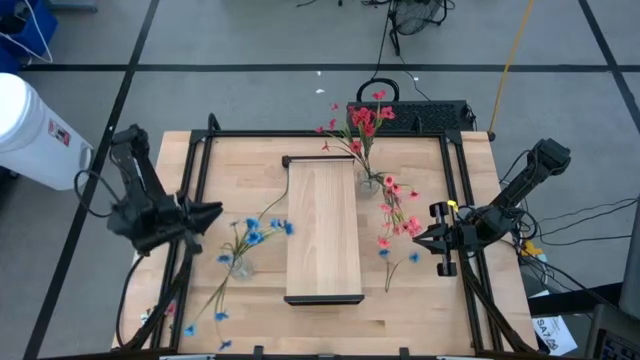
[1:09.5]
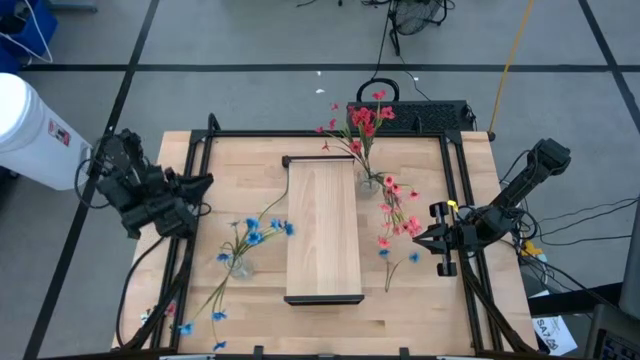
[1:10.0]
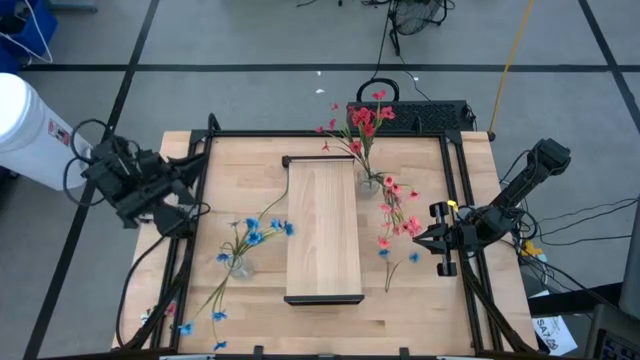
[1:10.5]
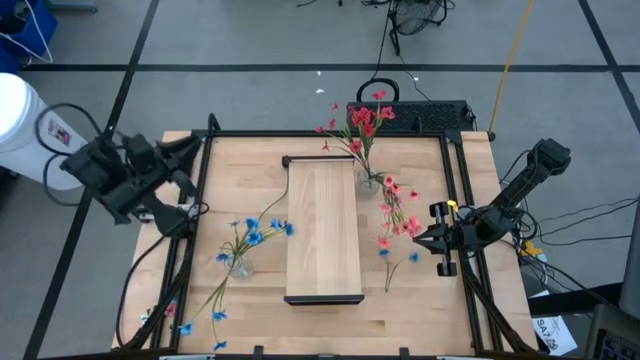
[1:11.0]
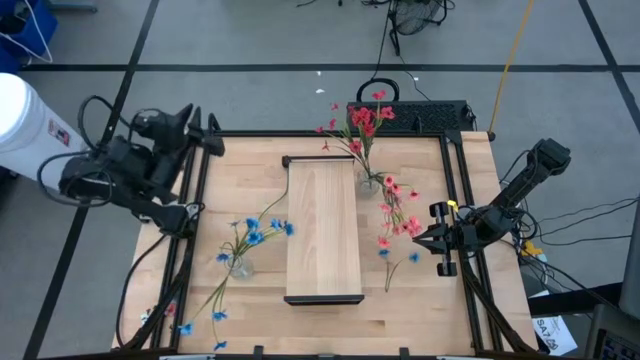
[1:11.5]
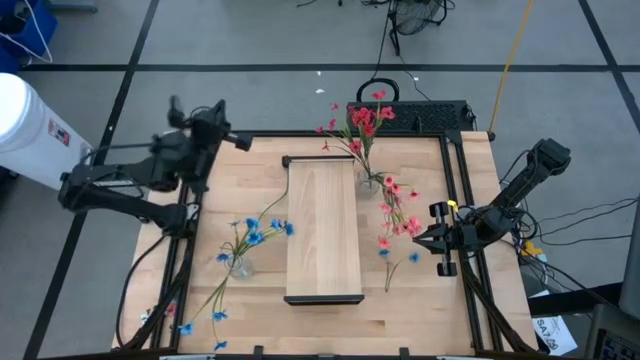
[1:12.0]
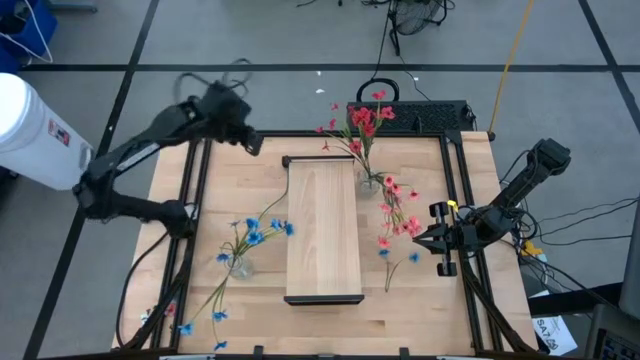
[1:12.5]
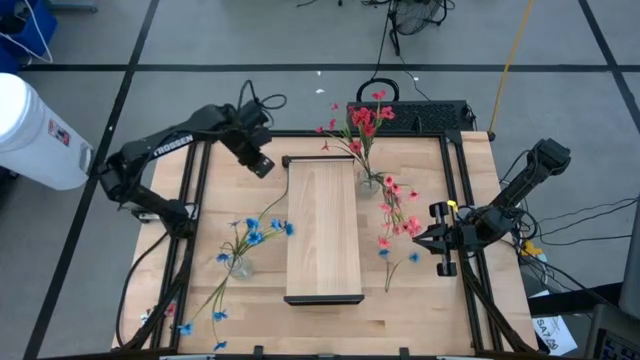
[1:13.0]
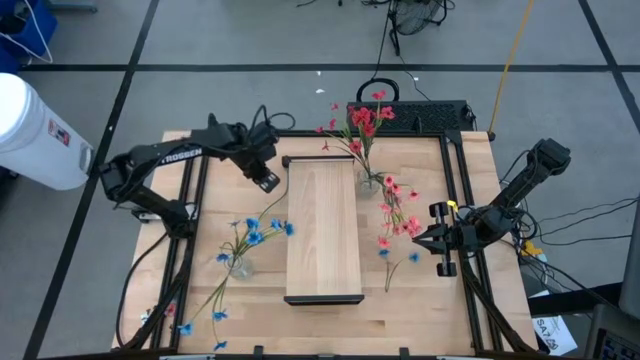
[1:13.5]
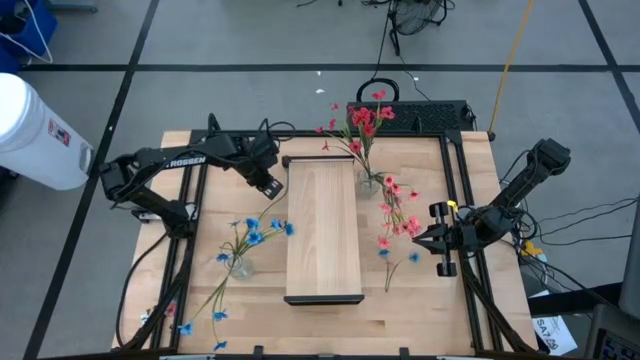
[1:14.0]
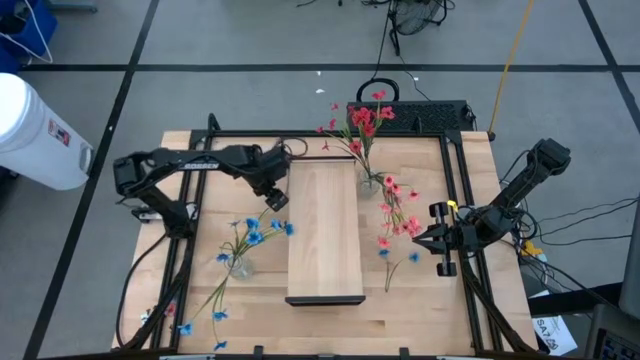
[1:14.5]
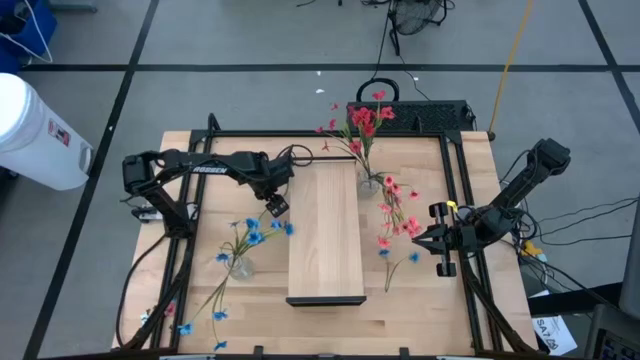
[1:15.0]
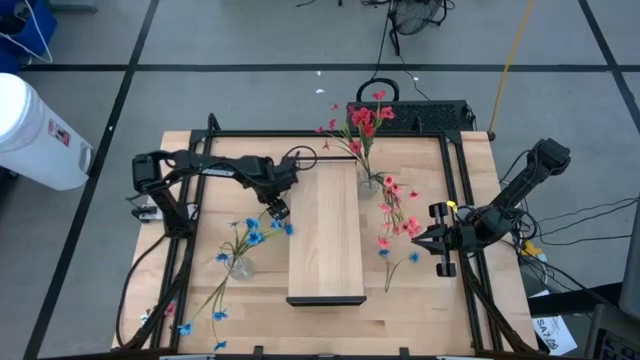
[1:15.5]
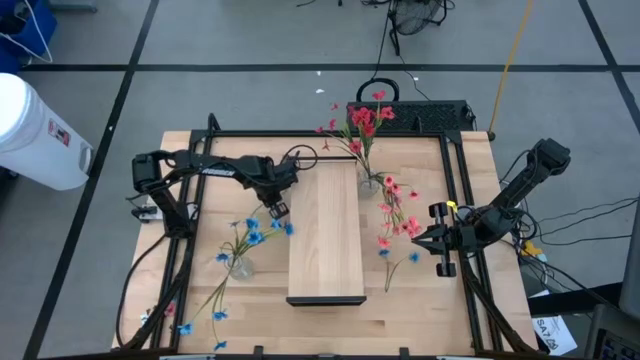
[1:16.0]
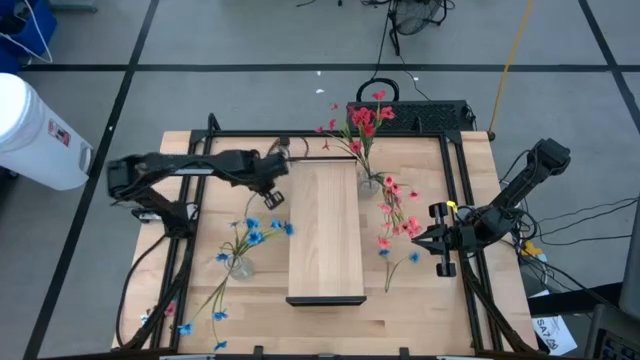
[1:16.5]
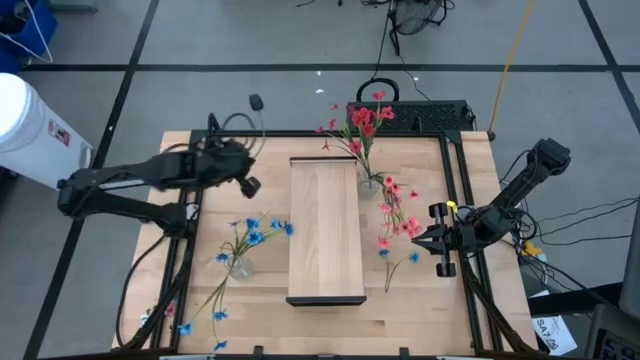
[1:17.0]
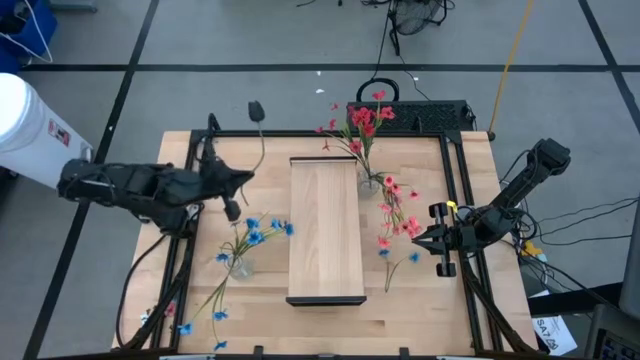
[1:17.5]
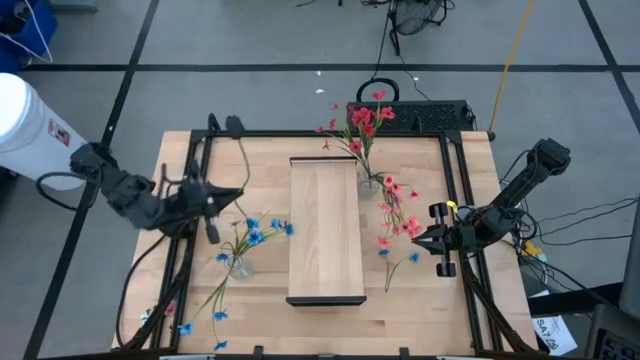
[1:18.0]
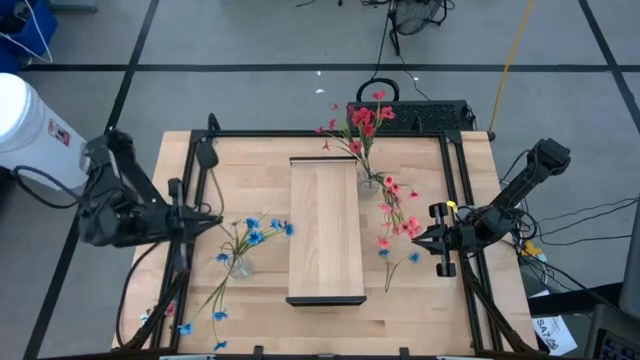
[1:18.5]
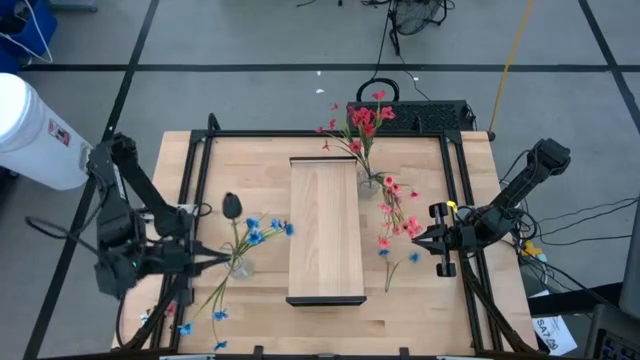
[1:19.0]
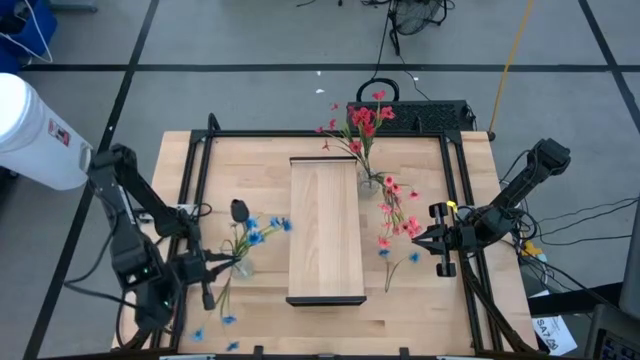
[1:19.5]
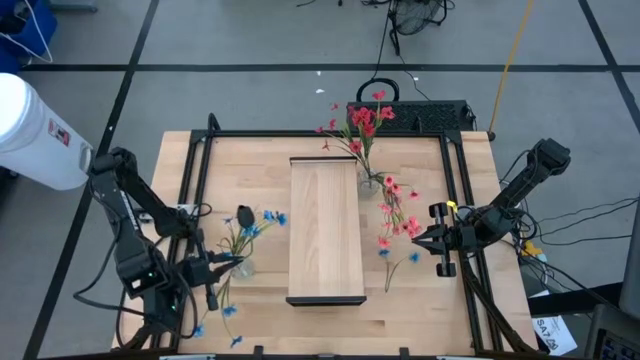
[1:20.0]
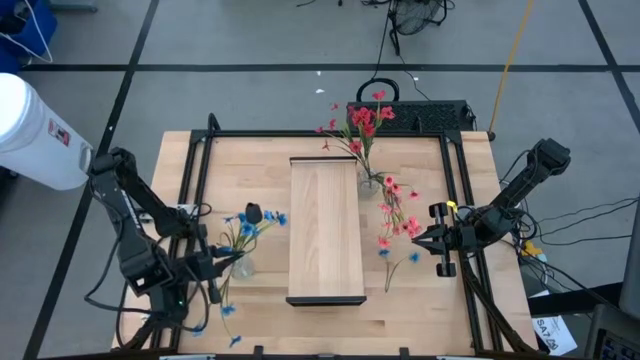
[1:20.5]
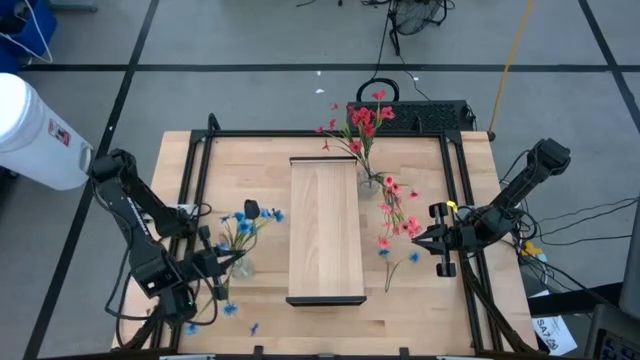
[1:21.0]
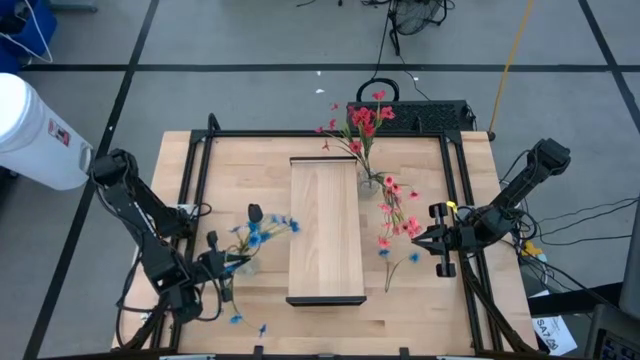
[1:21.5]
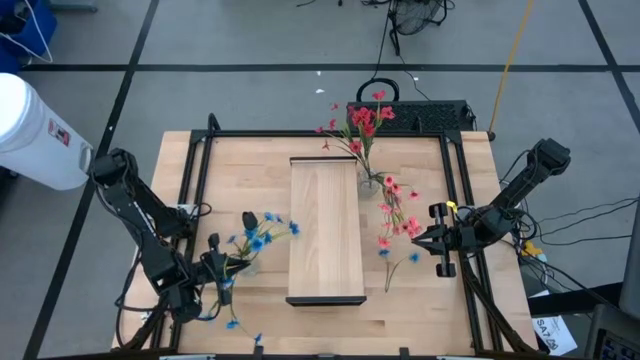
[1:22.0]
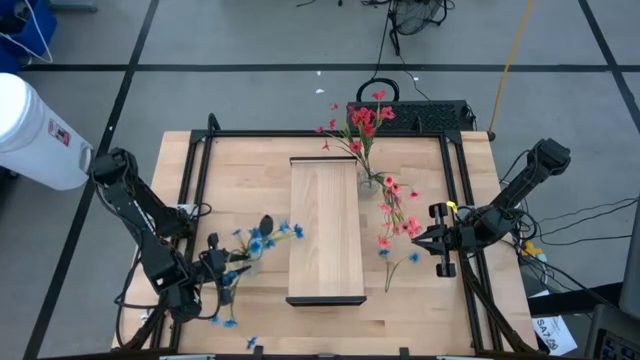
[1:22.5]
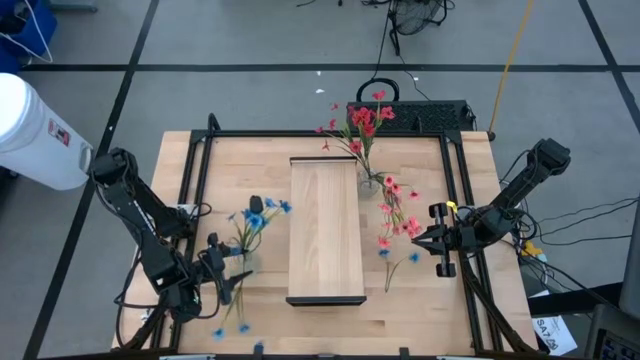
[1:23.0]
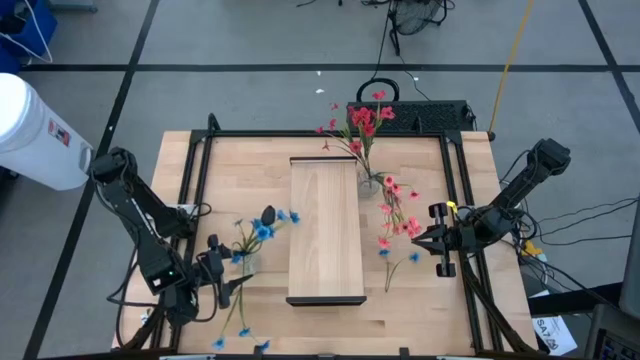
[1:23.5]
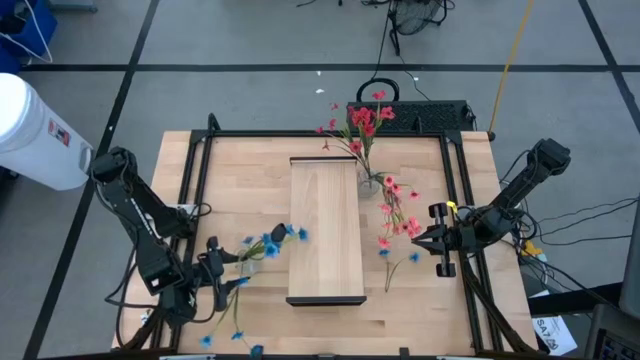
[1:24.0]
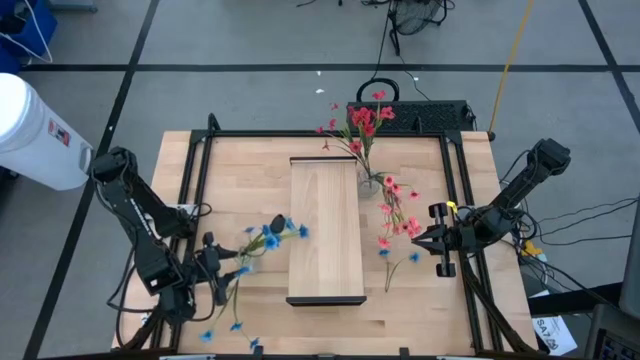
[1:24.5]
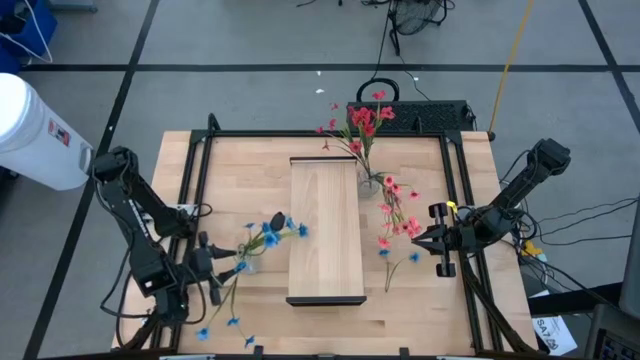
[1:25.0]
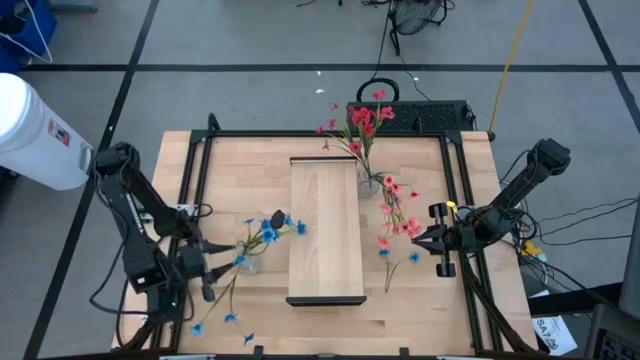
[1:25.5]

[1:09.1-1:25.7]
Task: Pick and place flowers into a vace then onto a shelf
Put the black flower into the left transparent vase

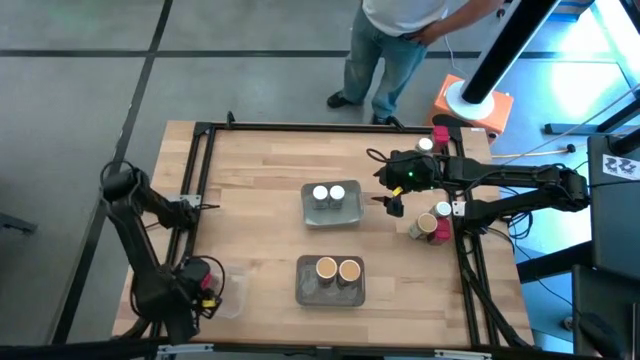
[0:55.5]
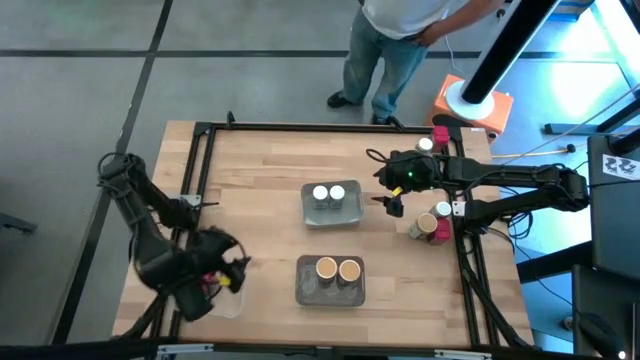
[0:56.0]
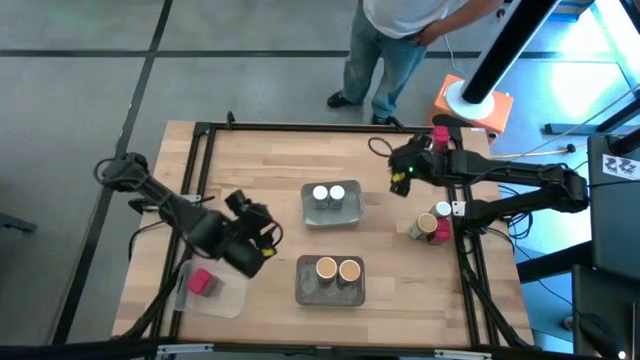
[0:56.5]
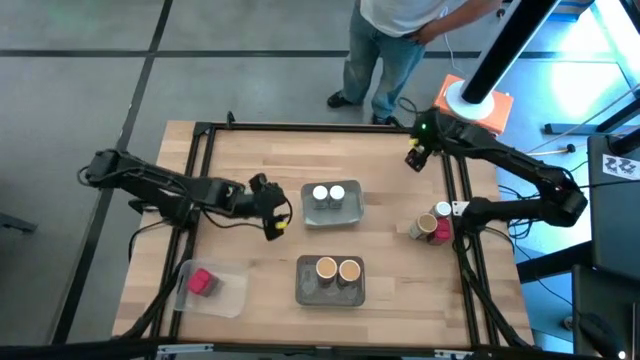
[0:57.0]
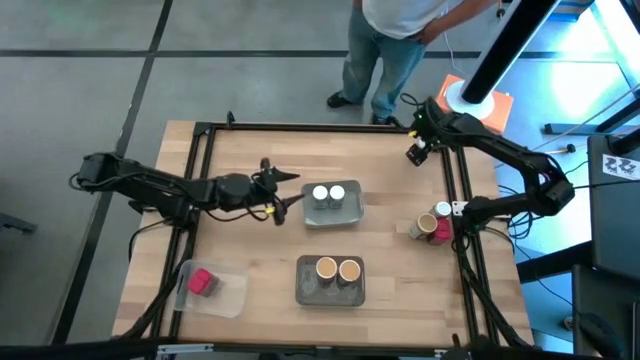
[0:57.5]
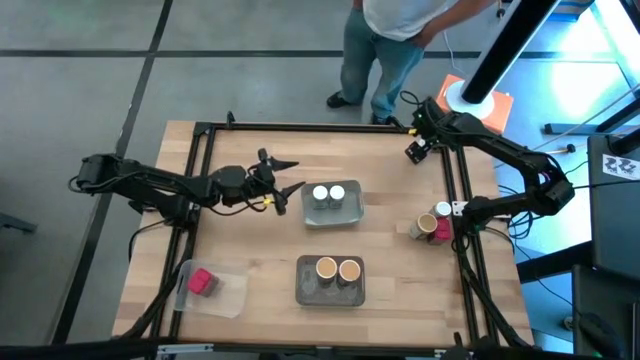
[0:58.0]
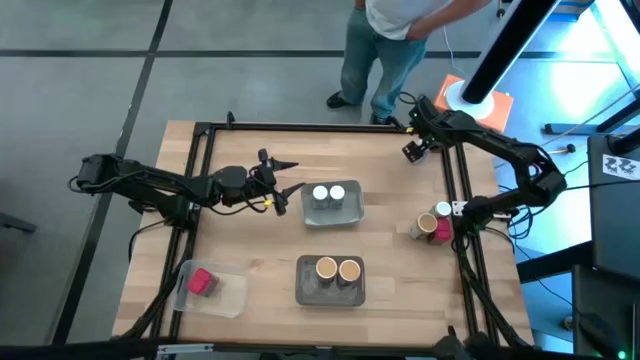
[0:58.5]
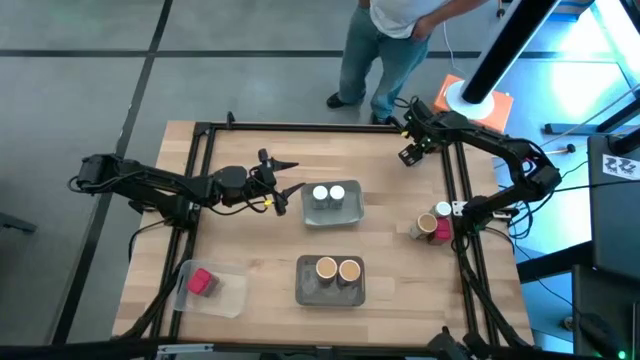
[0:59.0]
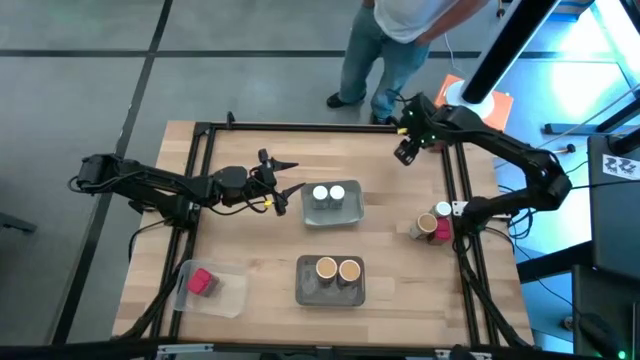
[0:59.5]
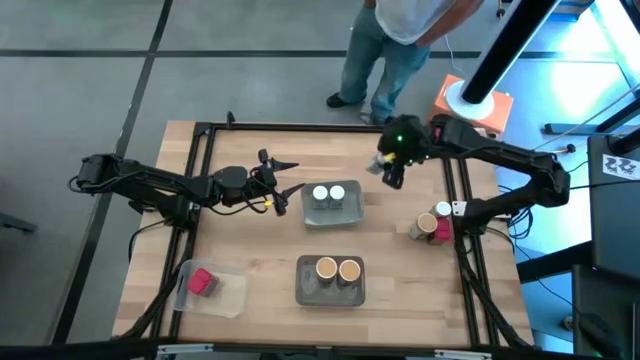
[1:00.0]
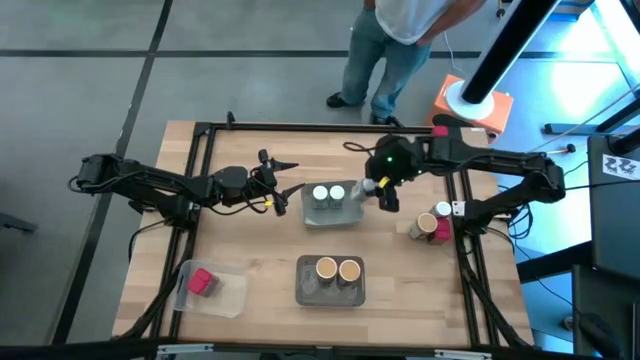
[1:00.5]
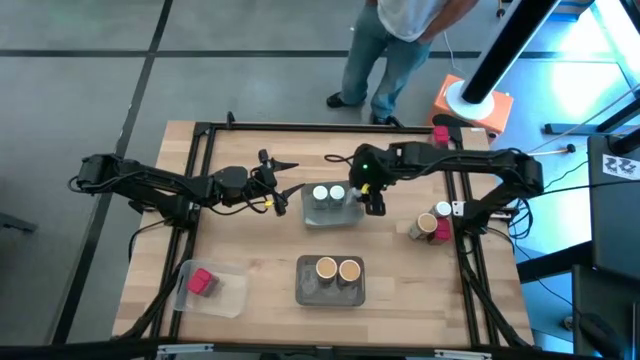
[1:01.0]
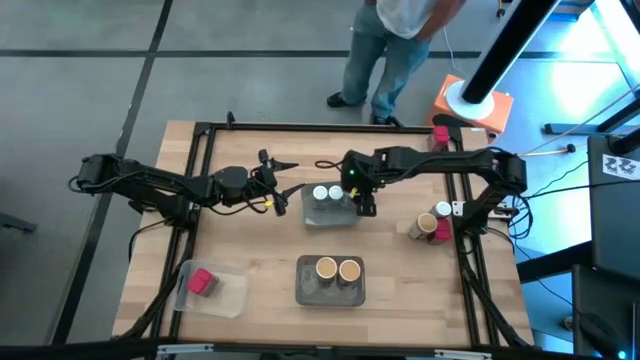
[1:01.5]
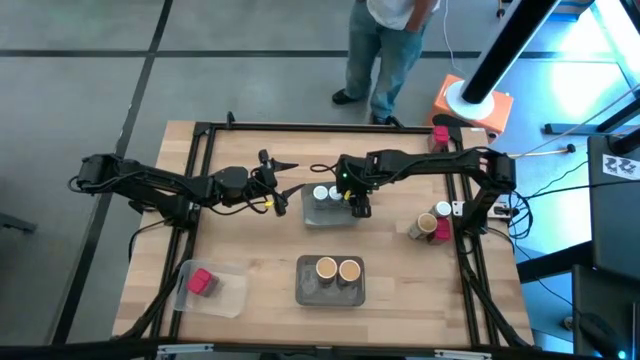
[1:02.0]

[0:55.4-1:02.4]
Task: Sort spices by type
Put the top white seasoning bottle into the gray bin aligned with the other white seasoning bottle
